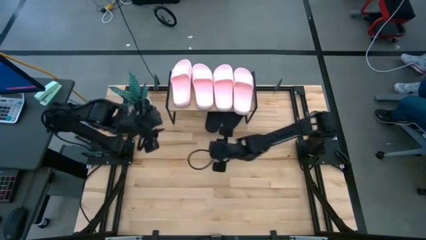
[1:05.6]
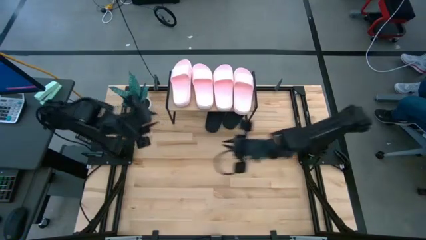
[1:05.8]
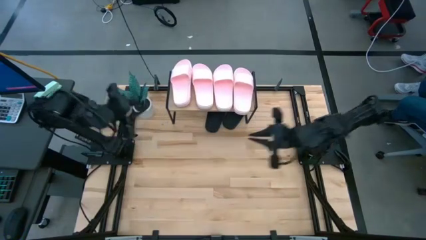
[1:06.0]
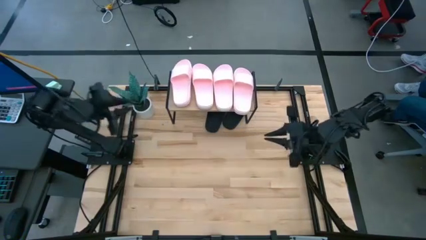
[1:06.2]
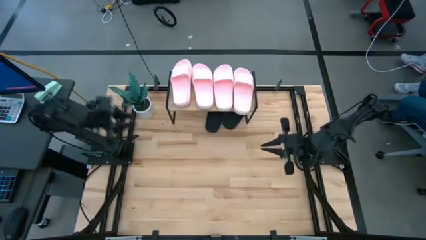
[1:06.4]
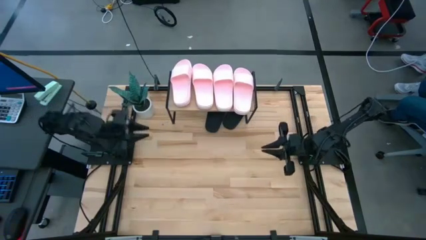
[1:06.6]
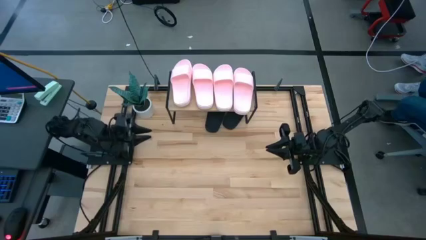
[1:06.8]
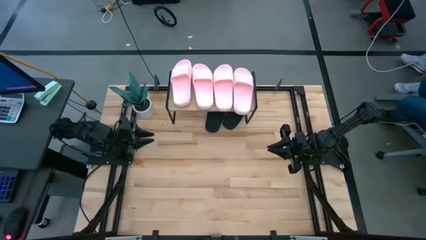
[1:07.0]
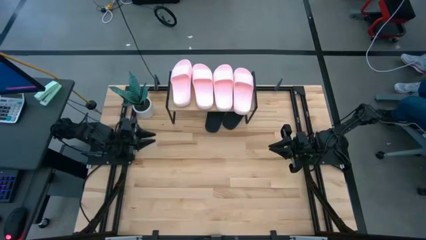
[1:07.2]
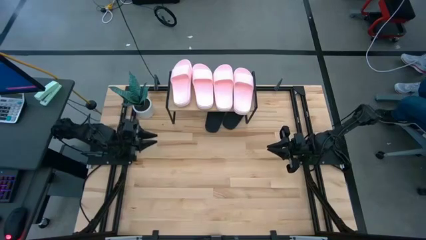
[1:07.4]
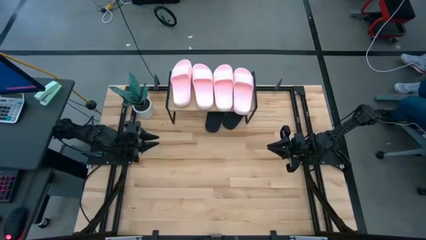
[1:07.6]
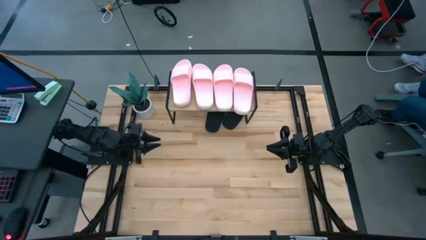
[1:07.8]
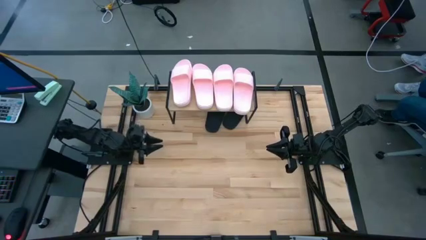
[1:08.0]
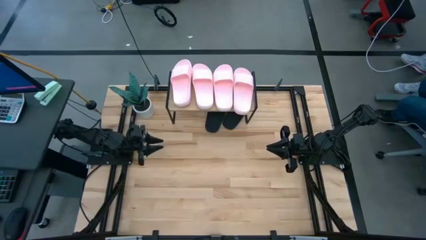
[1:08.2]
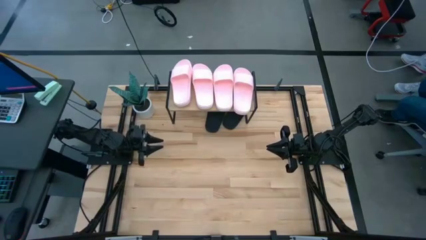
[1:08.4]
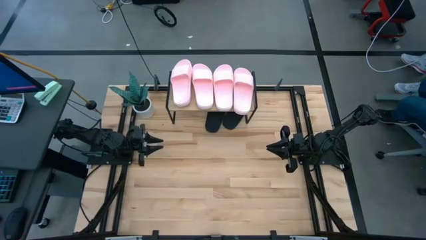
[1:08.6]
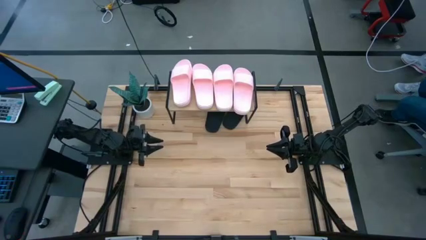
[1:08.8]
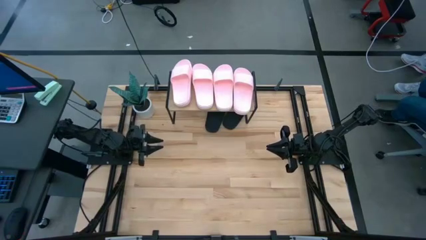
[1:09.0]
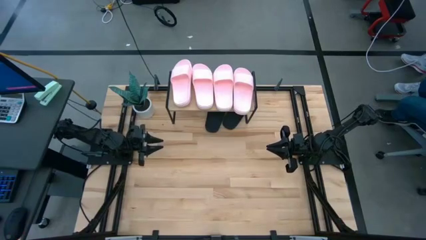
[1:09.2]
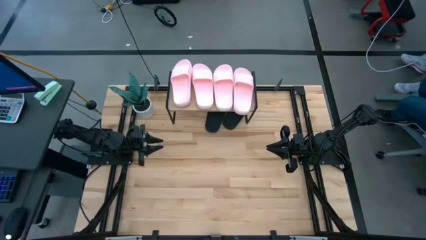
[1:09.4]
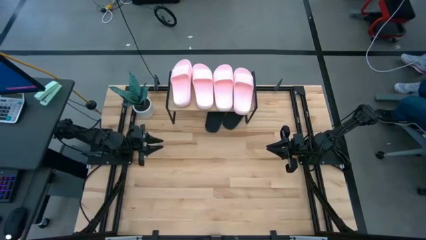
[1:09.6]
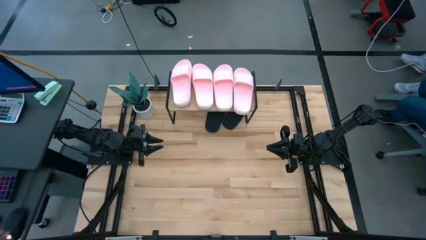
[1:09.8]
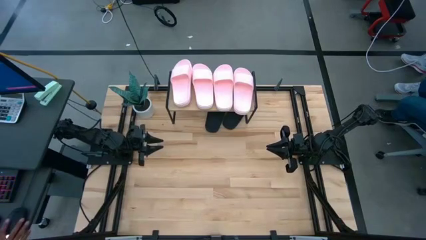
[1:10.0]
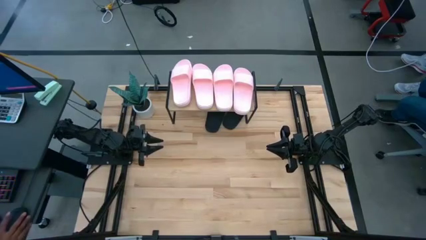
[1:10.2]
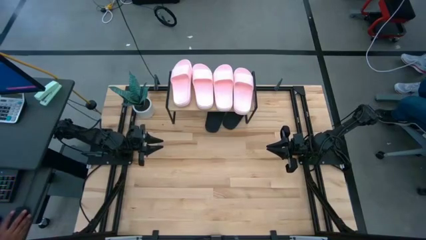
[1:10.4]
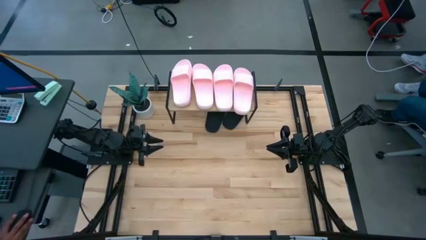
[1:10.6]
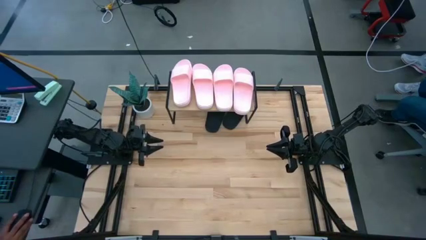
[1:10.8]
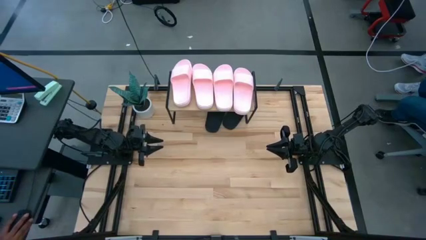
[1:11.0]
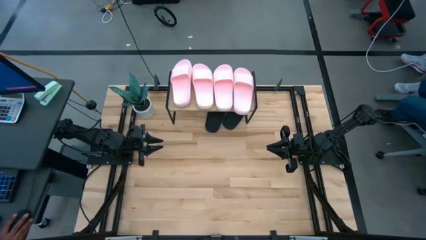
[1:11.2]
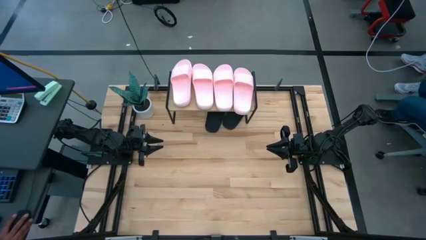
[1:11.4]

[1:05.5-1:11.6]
Task: Pick and place slides into the shelf
Return to Home Position

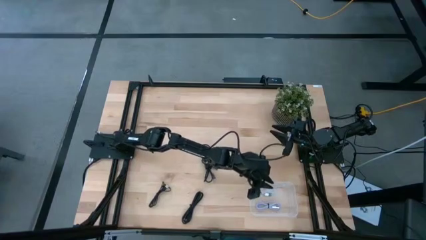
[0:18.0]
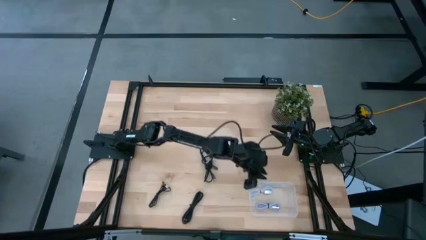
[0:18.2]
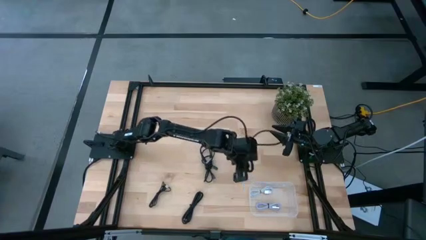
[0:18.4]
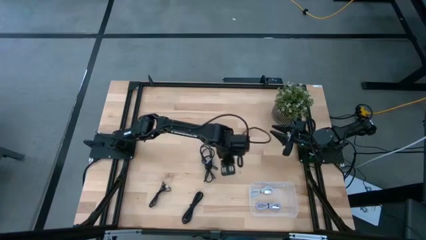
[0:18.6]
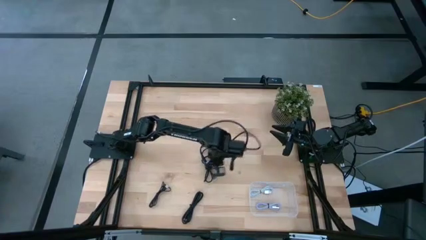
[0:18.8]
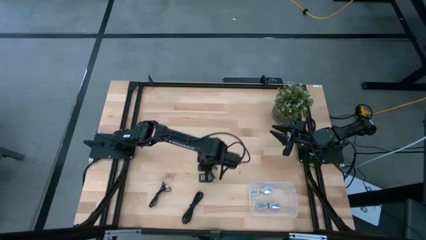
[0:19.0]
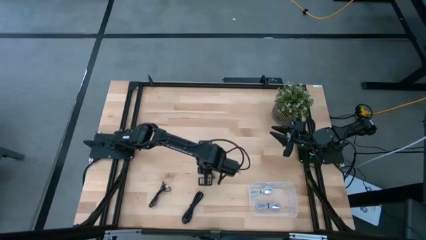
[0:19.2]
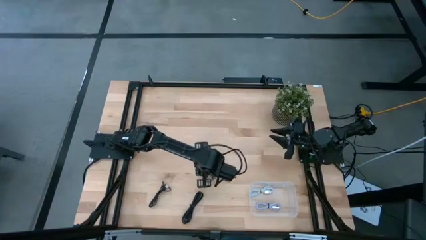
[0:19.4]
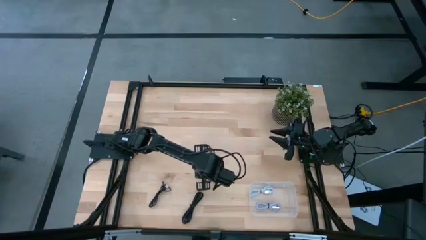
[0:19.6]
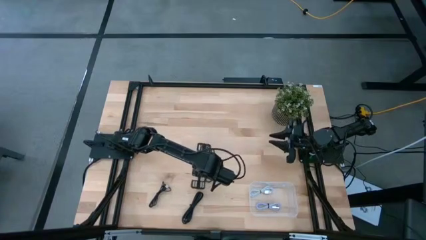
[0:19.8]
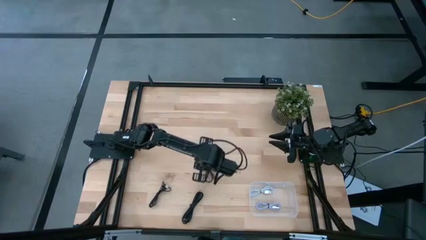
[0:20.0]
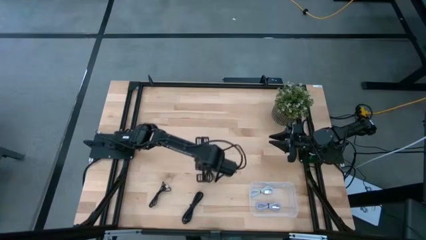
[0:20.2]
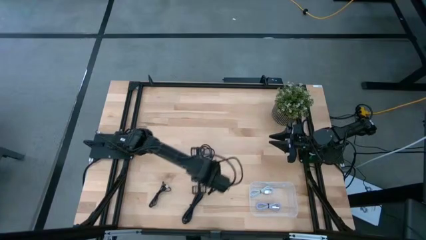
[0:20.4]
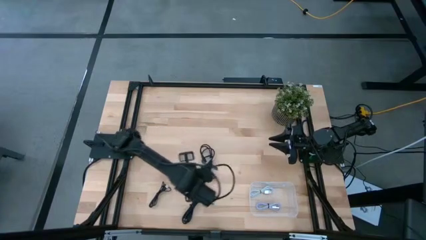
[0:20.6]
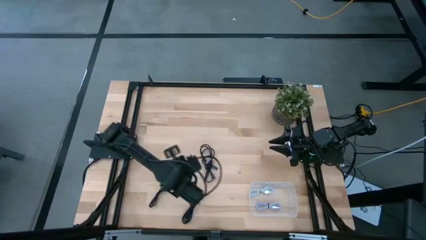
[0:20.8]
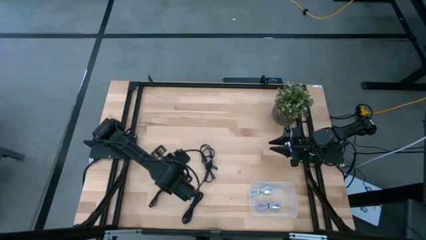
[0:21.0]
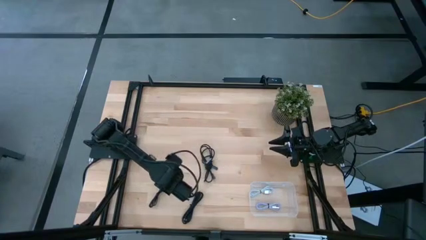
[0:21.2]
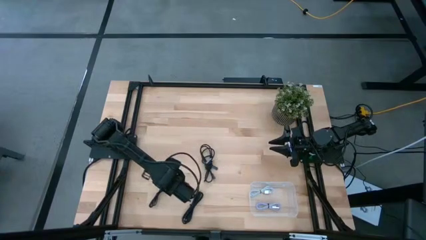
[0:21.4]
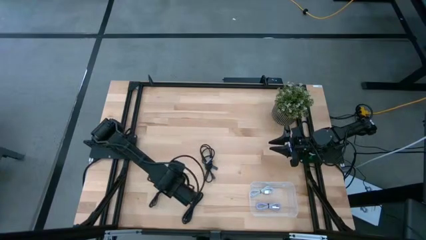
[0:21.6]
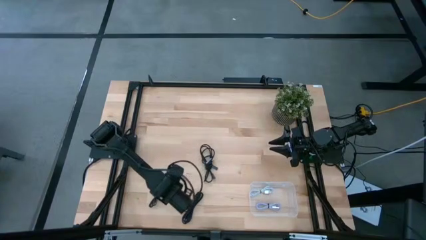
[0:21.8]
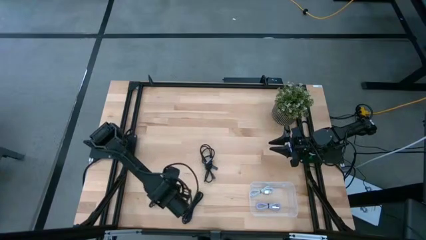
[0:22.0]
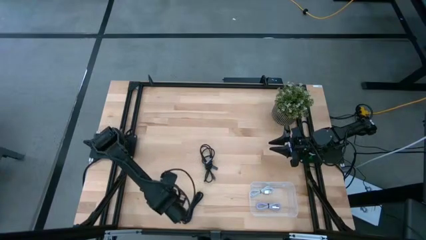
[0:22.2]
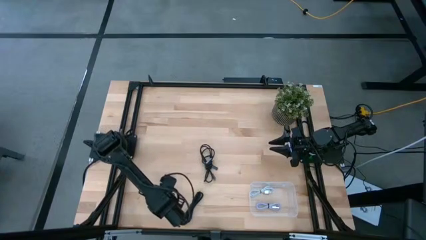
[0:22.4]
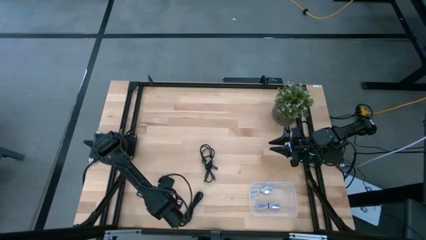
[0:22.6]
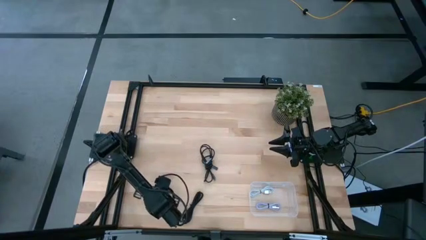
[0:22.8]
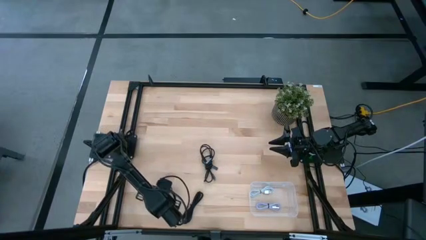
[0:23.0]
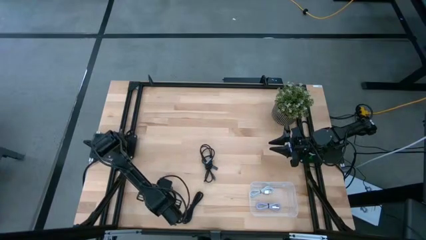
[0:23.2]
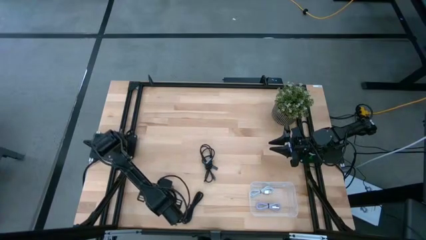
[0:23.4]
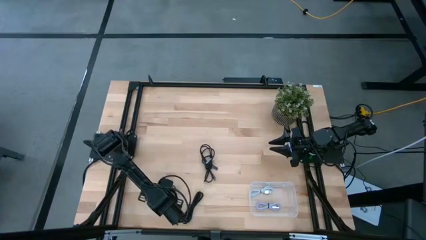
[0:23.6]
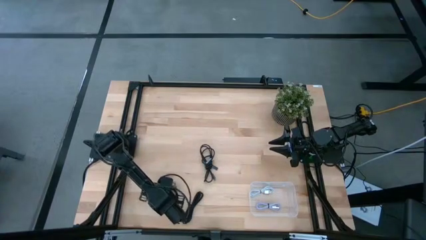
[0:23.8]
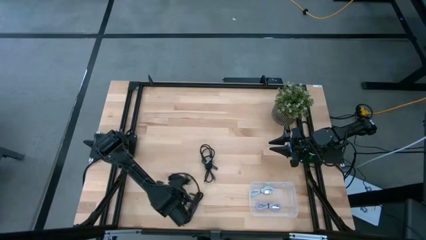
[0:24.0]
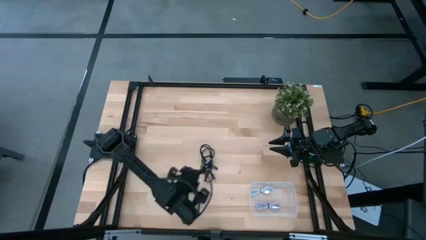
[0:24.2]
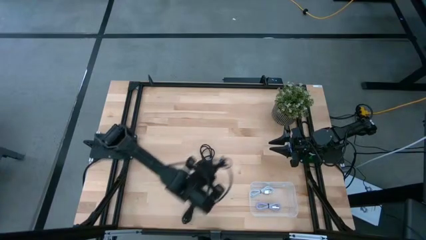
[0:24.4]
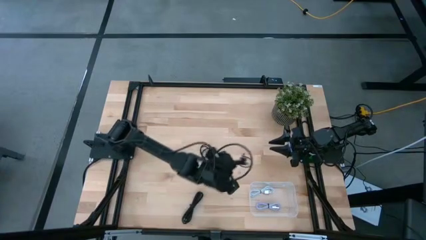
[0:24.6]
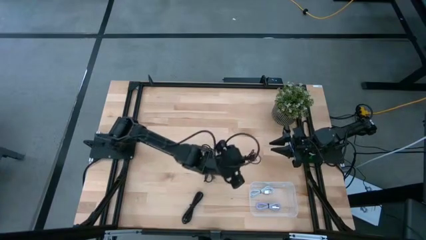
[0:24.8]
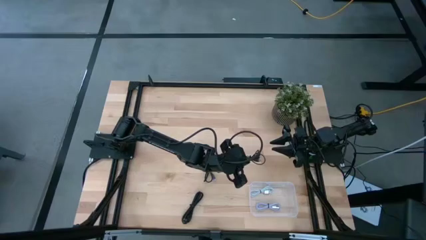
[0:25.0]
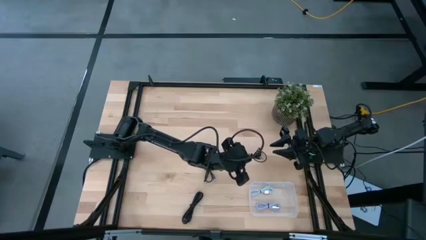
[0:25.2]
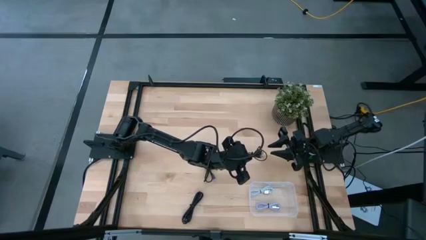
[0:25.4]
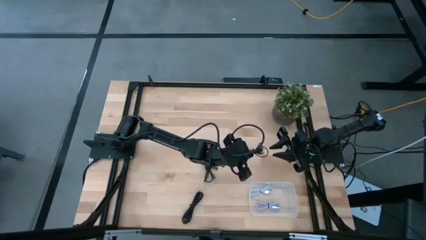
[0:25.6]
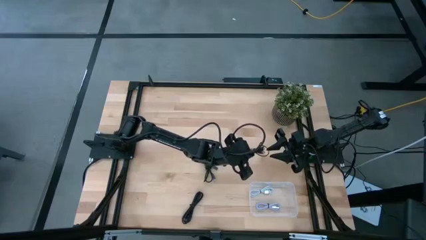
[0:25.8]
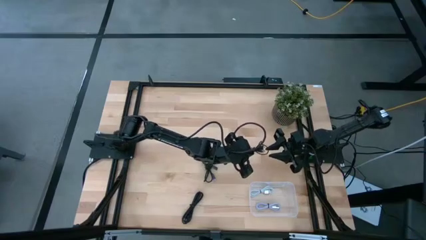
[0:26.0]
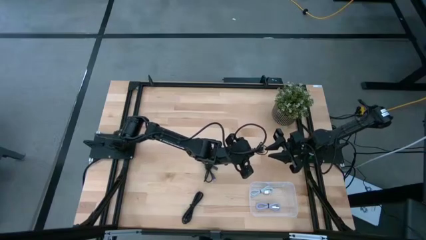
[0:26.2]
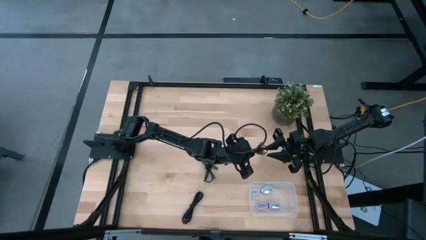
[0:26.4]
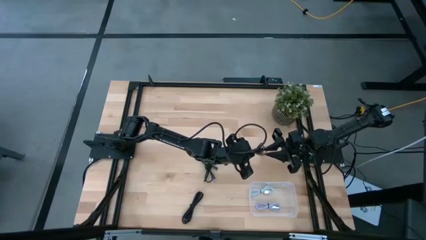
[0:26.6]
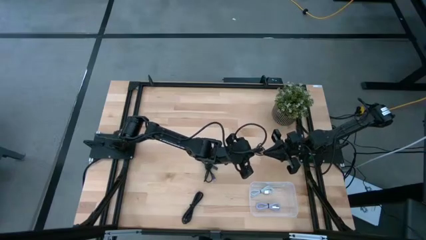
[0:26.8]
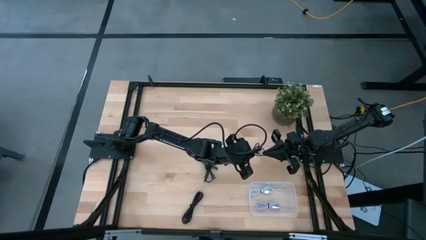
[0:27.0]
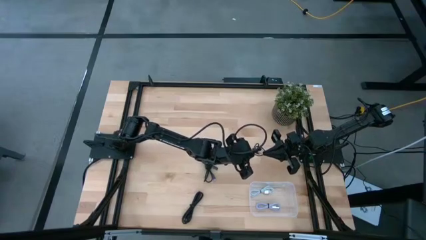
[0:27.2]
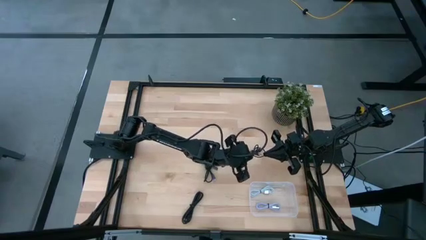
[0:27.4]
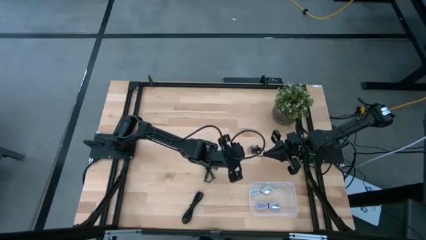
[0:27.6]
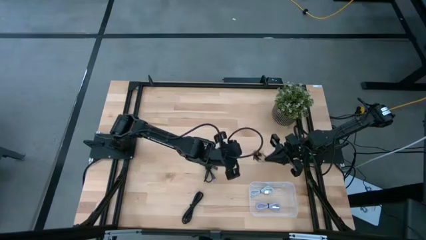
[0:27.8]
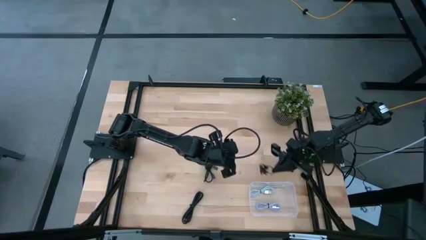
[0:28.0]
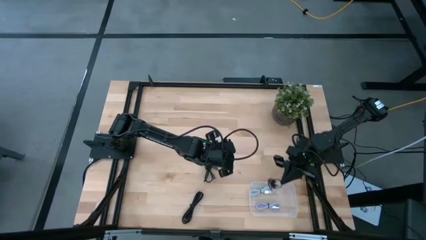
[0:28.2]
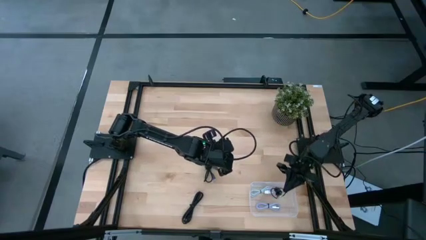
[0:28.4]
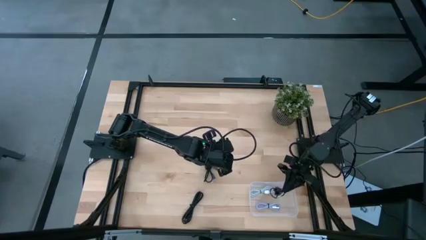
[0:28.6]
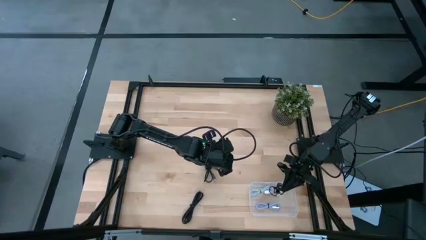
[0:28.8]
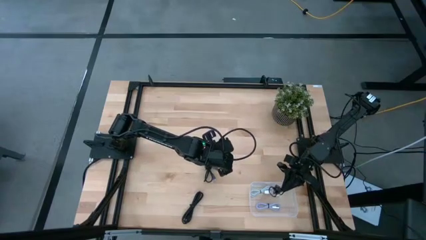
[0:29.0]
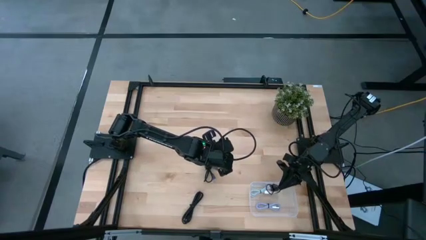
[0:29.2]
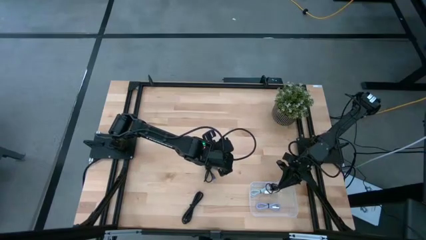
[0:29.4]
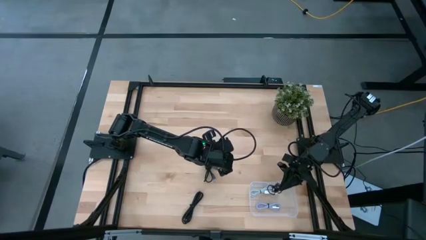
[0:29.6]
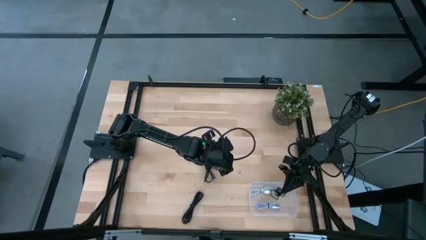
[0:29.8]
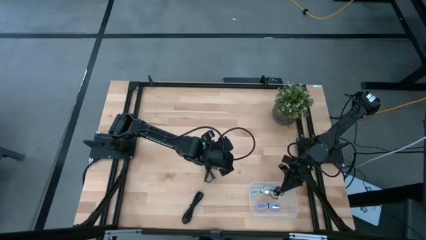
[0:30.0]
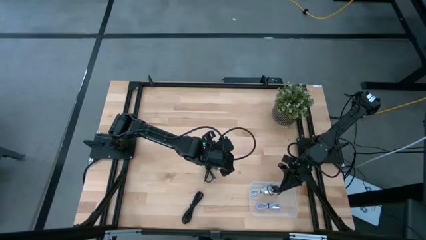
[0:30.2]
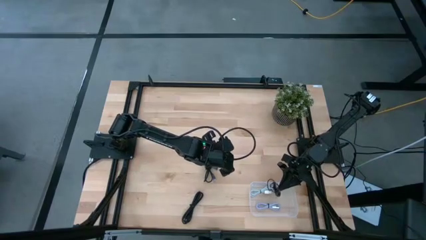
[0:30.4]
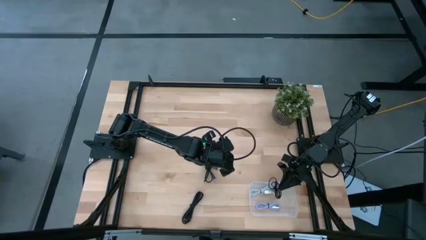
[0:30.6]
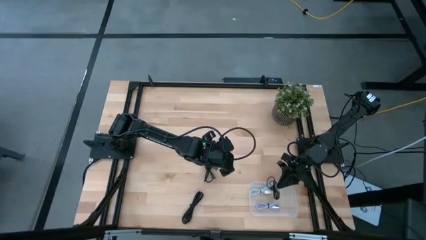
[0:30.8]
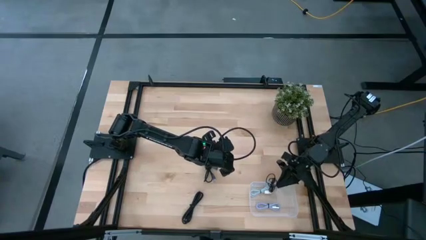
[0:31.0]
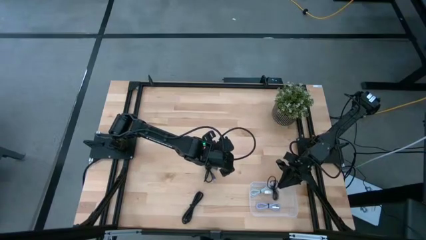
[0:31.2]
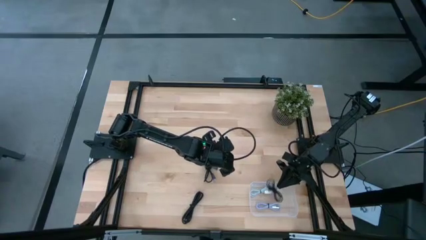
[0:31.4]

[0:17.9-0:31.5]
Task: Pick and place USB-C Cables
Put the bottom left black charger cable into the transparent bin
